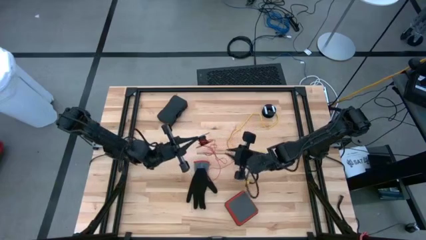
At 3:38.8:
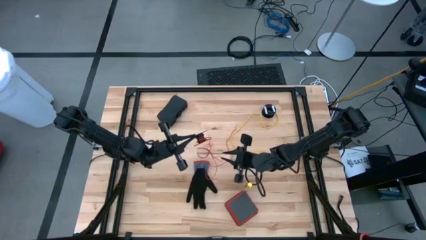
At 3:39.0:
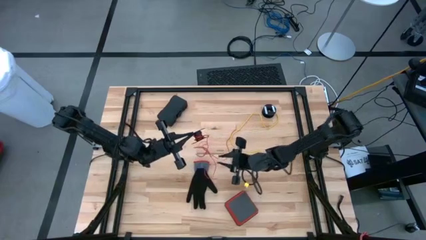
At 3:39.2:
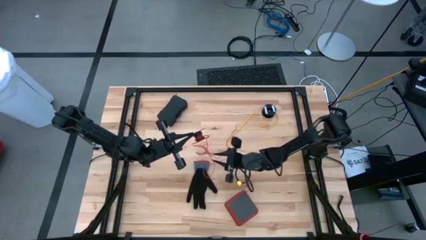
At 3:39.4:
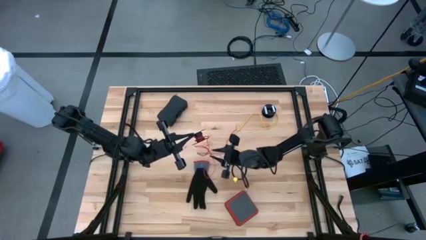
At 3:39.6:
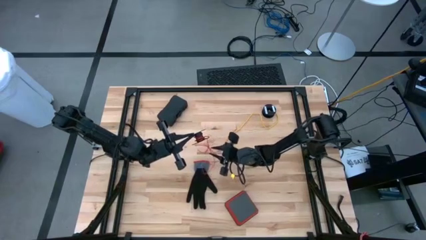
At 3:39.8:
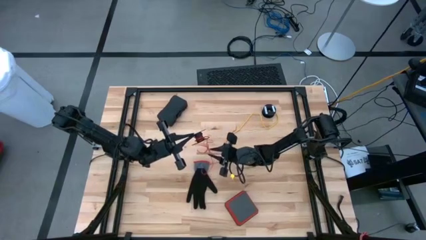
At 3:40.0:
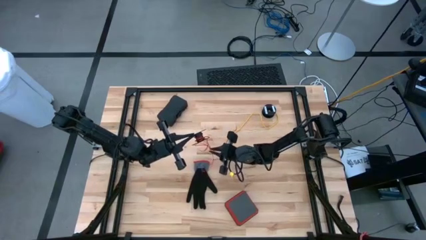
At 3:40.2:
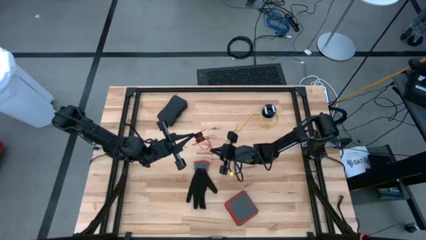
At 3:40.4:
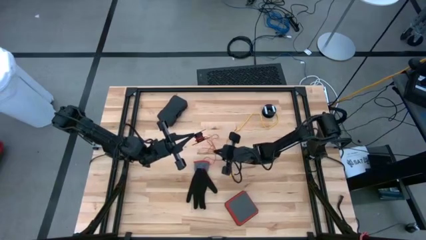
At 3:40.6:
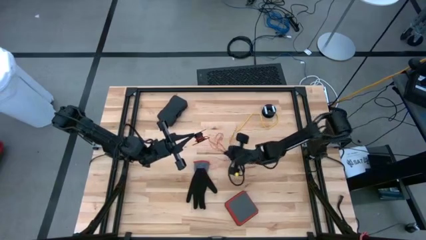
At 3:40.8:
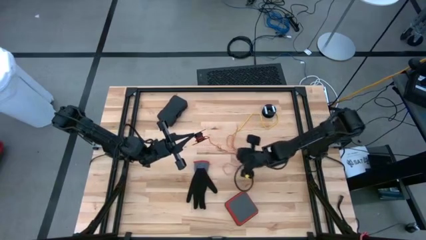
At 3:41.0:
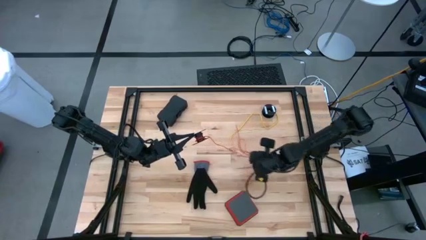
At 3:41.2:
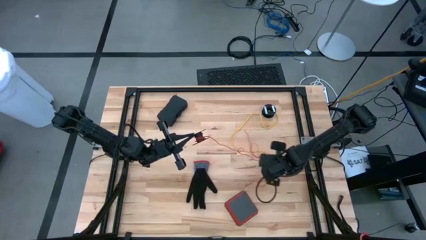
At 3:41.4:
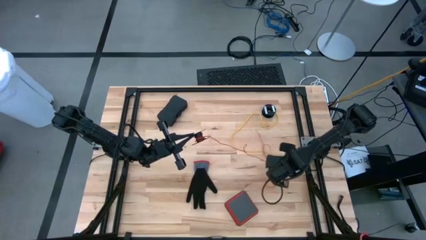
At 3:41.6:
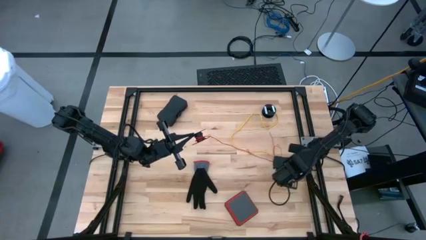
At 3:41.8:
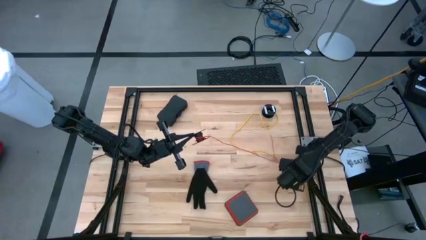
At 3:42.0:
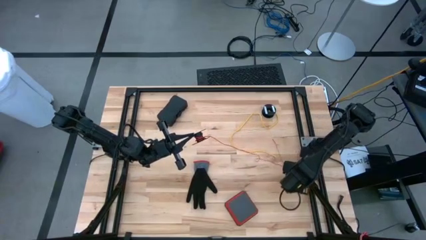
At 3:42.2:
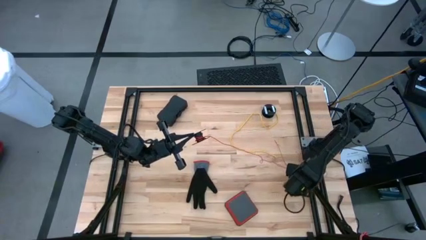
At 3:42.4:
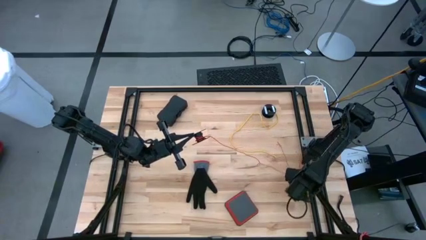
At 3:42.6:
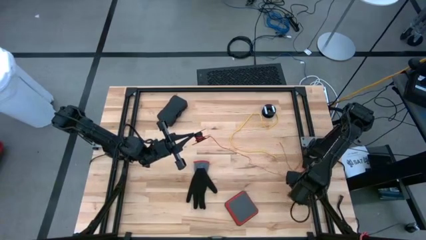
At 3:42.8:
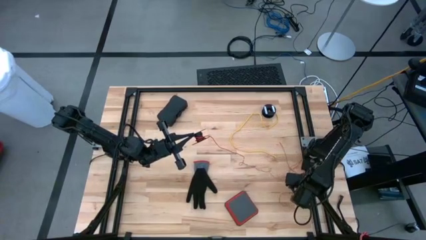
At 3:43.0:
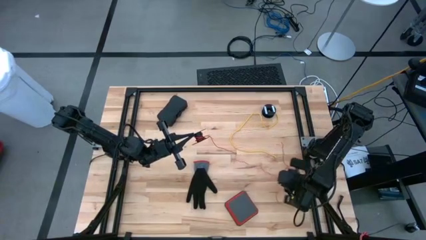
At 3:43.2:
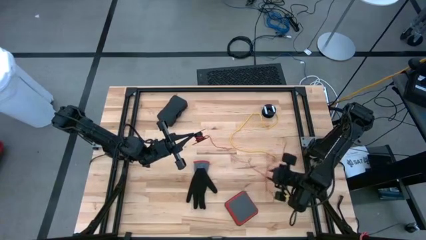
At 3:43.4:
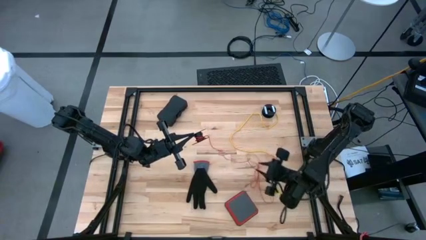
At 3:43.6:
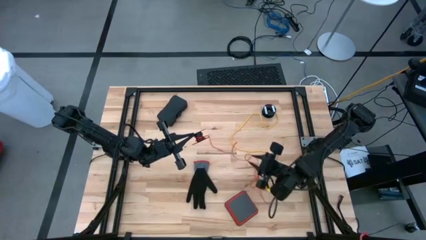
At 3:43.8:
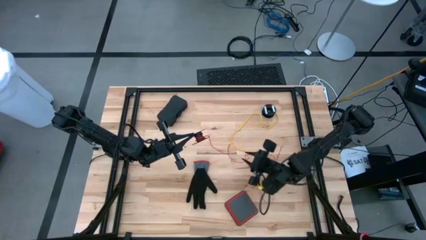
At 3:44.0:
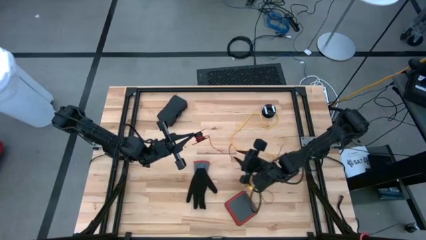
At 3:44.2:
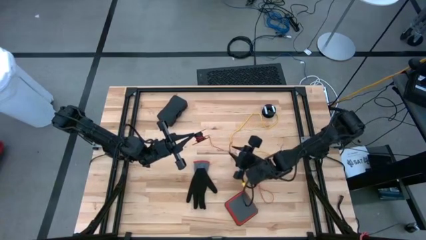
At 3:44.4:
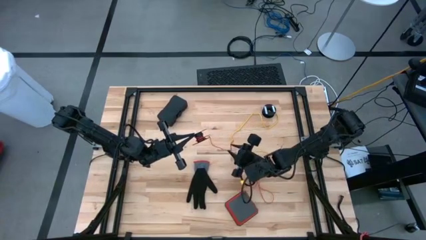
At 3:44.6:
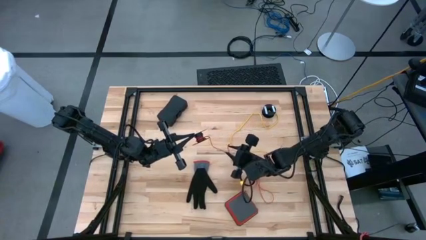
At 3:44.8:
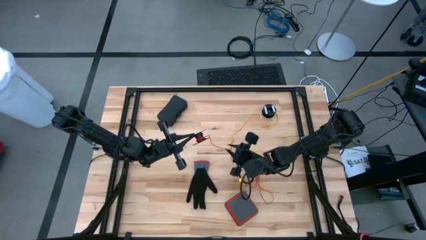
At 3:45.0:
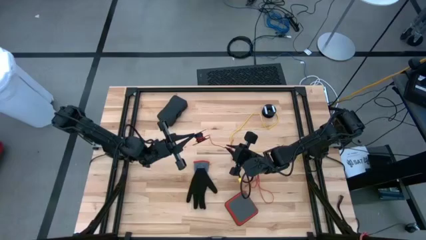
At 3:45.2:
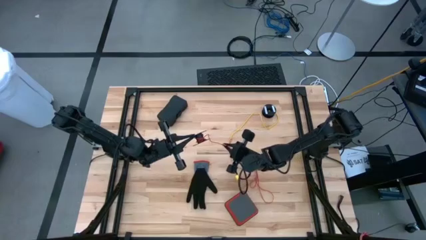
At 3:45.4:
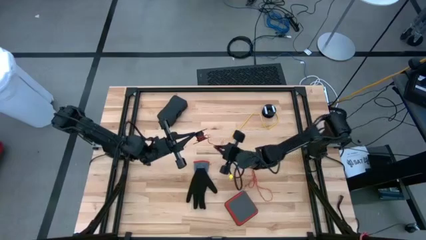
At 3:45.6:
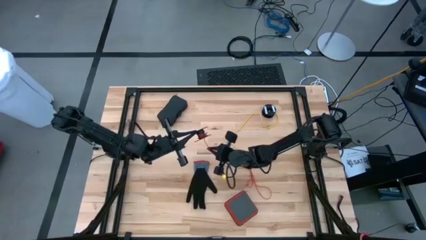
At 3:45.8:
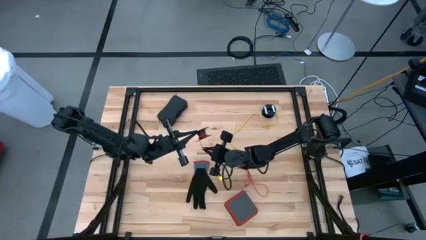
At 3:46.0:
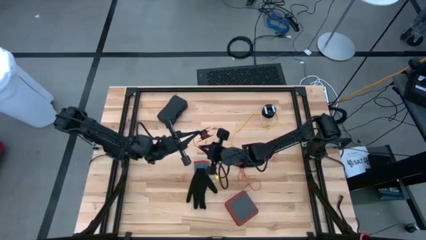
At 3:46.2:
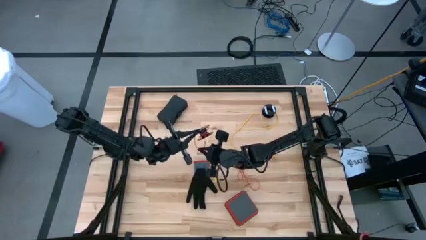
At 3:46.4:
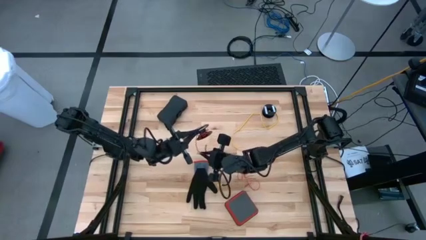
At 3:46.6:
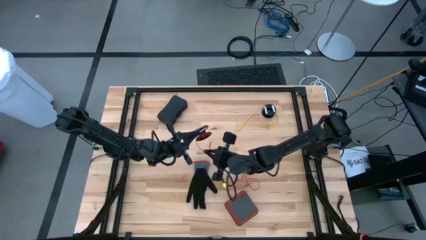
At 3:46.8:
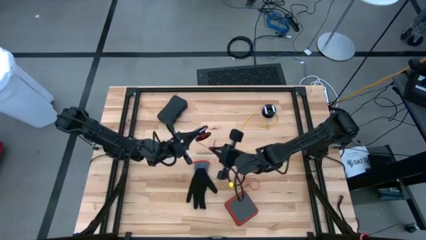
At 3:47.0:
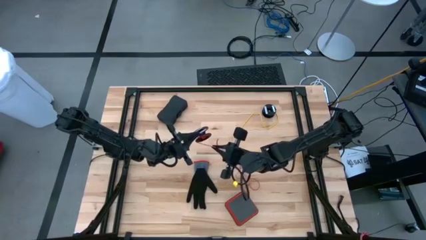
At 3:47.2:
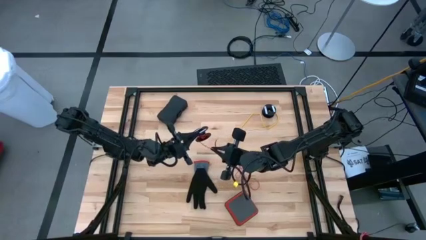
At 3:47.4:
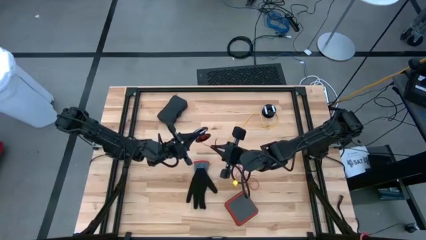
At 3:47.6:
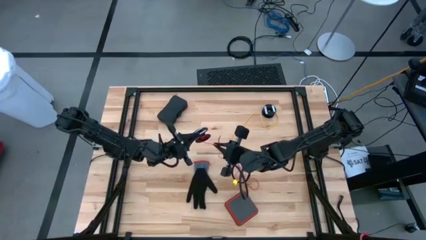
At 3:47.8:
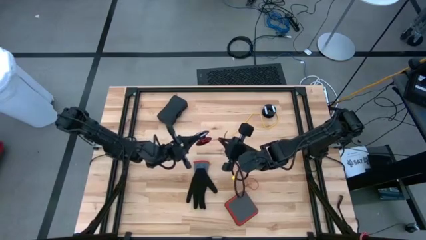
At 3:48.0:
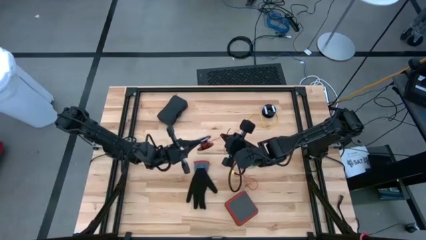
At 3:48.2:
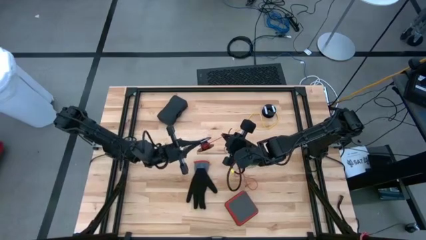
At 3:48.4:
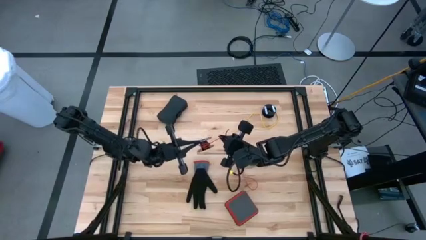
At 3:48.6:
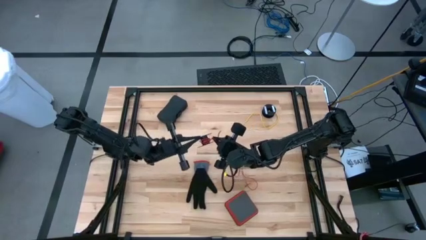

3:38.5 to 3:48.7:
Task: Coil cords
Coil the red wire onto the black spool

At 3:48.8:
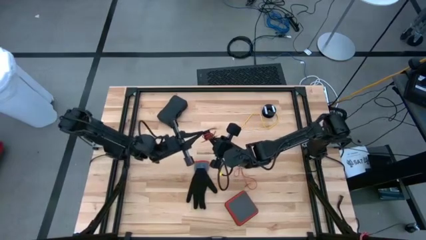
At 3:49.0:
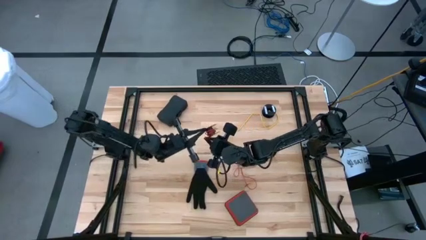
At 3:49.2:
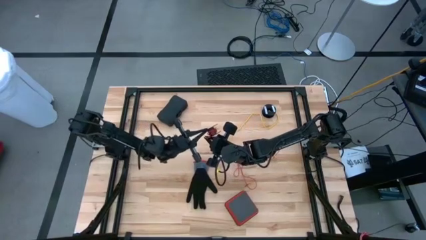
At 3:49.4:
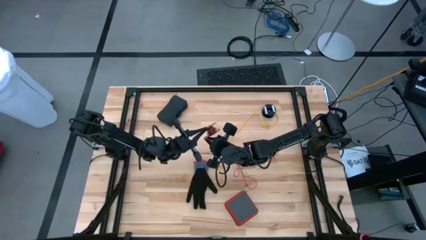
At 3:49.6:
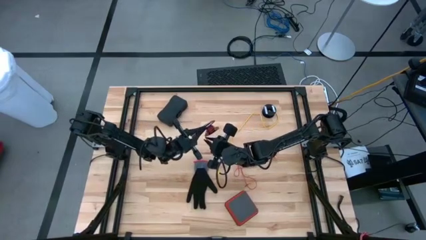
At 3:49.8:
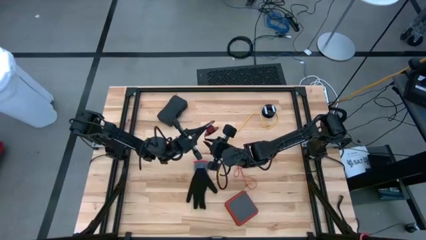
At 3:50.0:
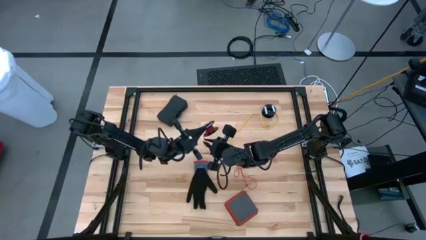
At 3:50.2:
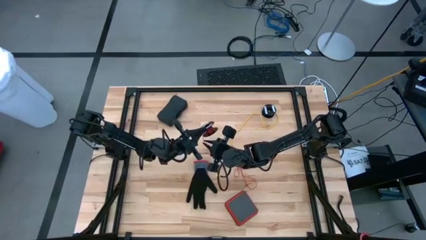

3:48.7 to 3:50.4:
Coil the red wire onto the black spool

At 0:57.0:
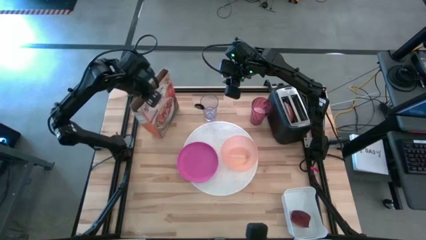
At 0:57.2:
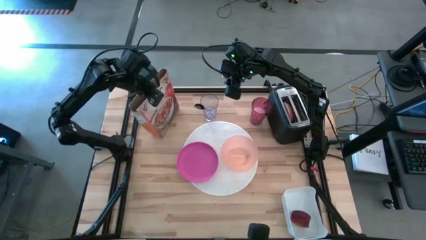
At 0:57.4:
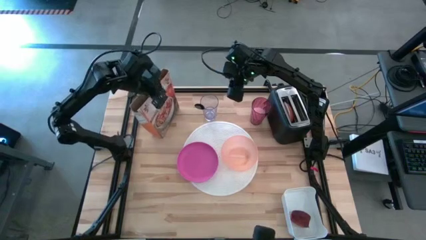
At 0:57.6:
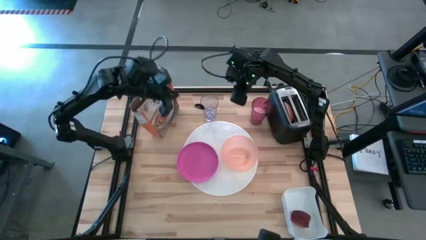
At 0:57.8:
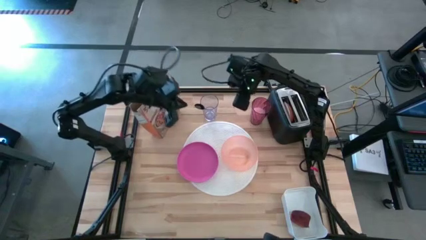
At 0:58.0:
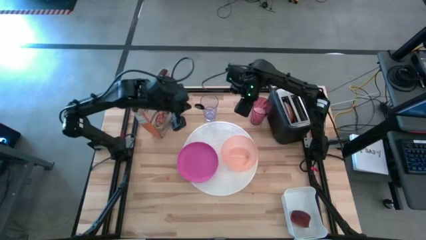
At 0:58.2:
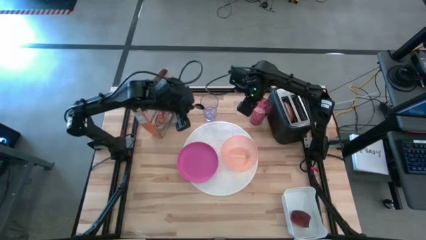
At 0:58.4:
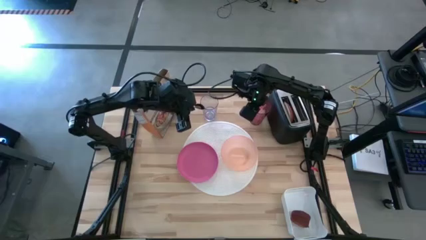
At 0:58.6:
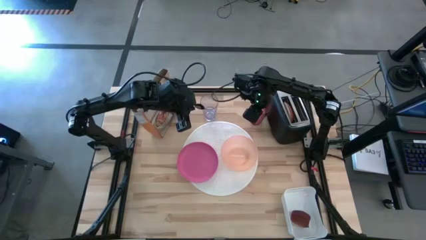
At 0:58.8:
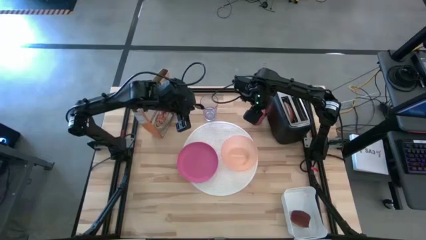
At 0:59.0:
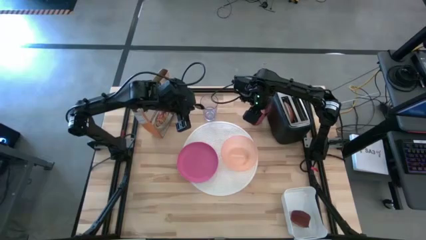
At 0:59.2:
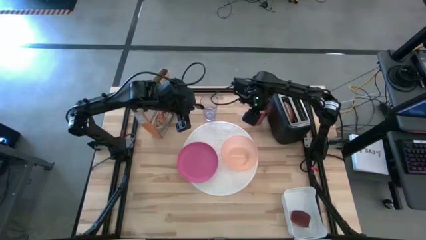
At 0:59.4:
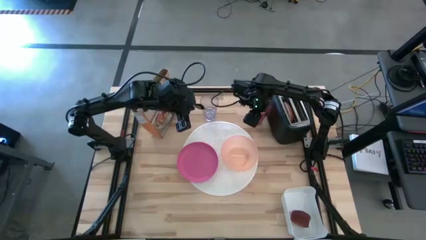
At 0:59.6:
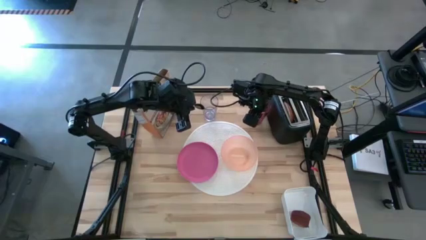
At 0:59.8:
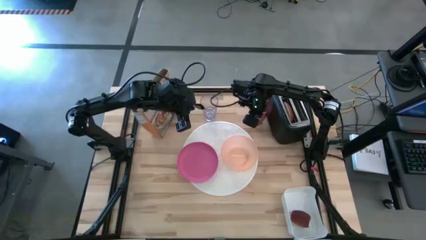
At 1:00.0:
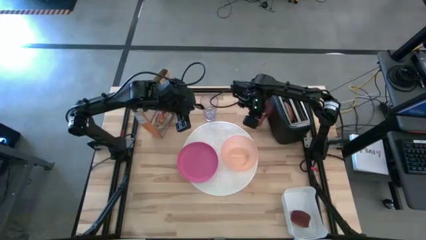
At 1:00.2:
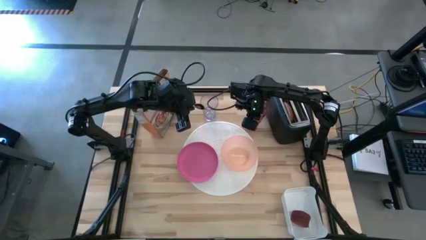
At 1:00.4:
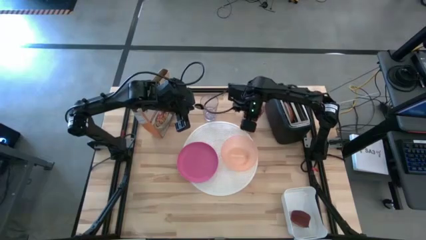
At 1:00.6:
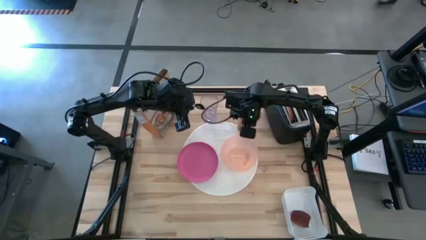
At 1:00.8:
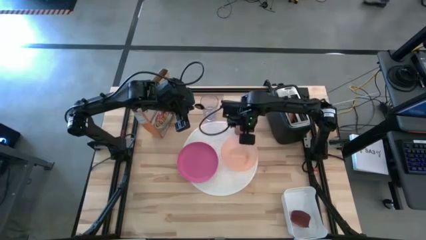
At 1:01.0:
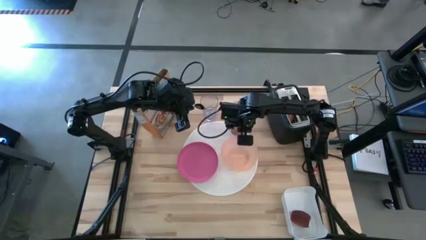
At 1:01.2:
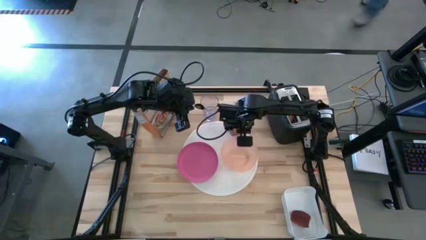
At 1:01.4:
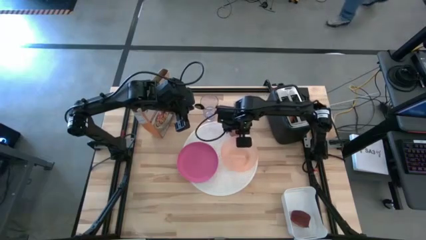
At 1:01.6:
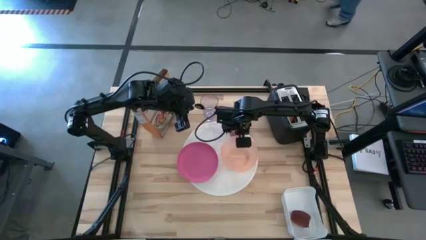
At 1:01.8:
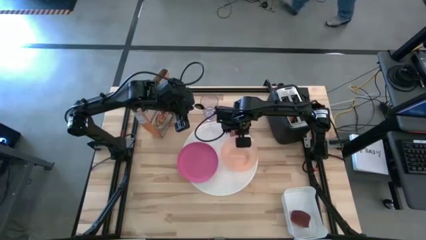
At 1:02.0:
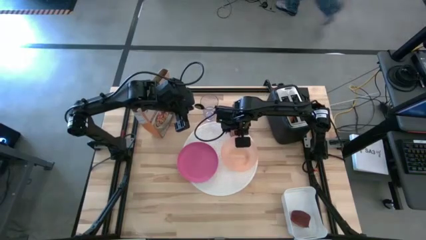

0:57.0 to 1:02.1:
Task: Arrange a breakfast setting
Put the violet glass on the top of the orange bowl on the white place mat
